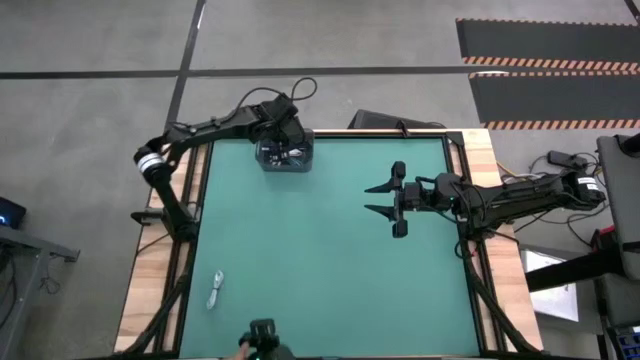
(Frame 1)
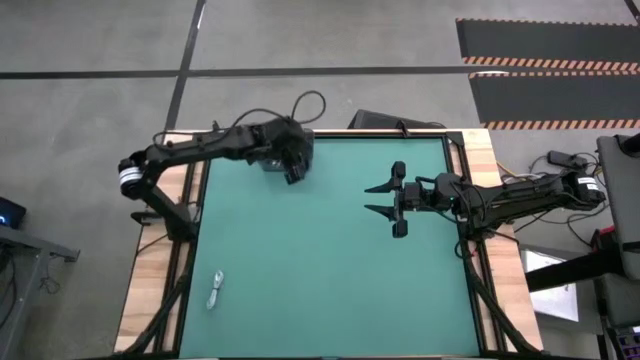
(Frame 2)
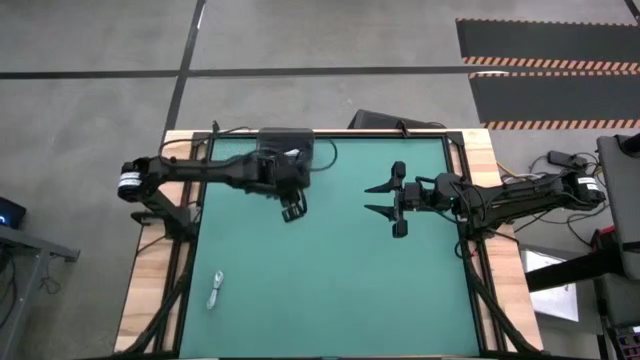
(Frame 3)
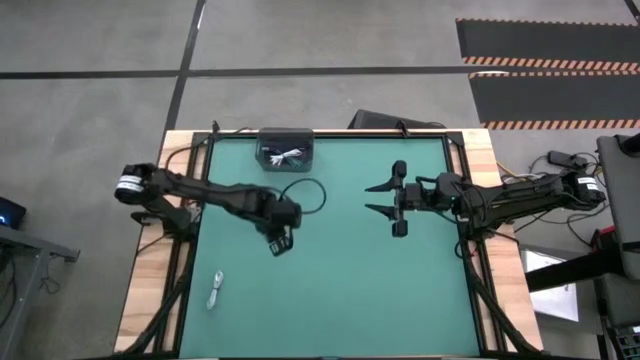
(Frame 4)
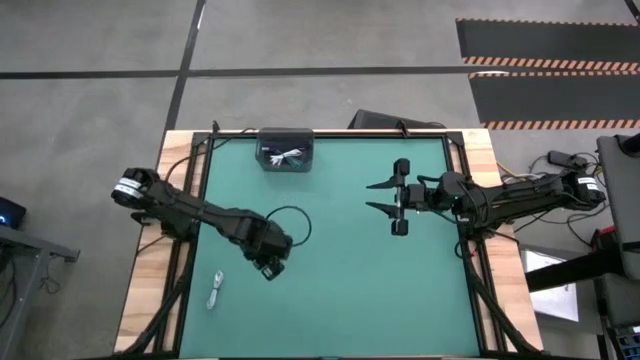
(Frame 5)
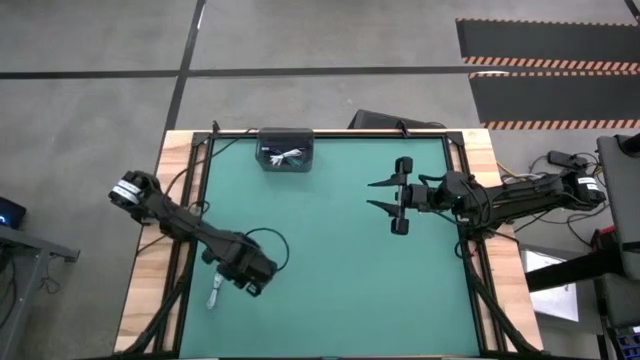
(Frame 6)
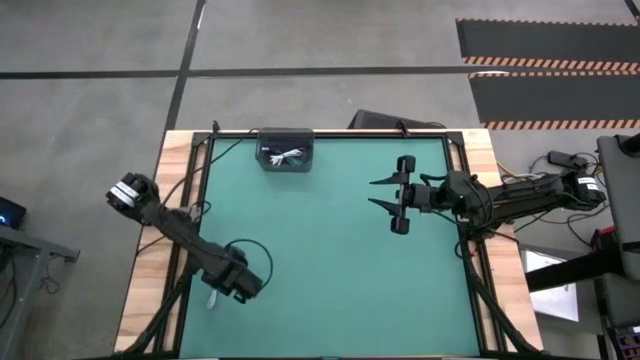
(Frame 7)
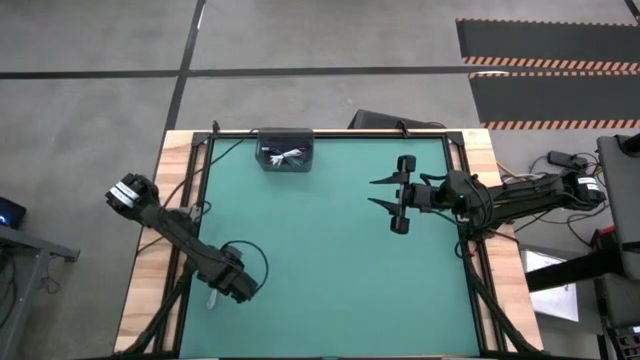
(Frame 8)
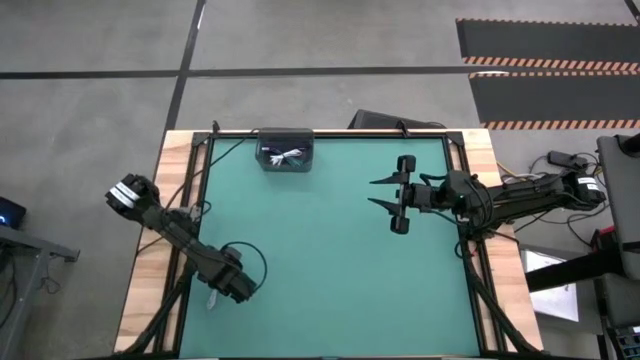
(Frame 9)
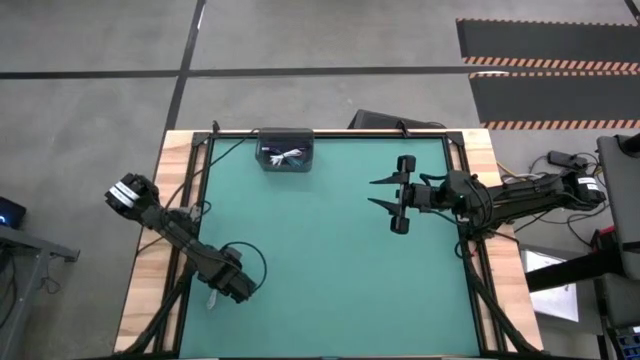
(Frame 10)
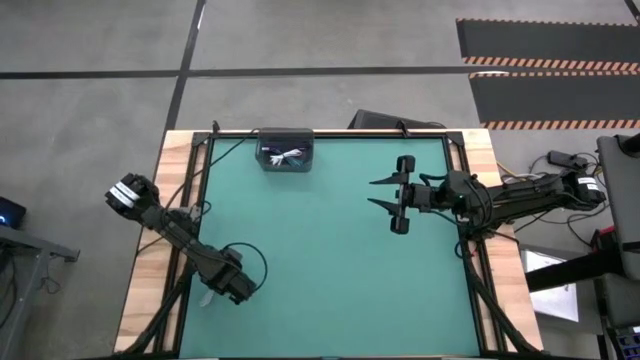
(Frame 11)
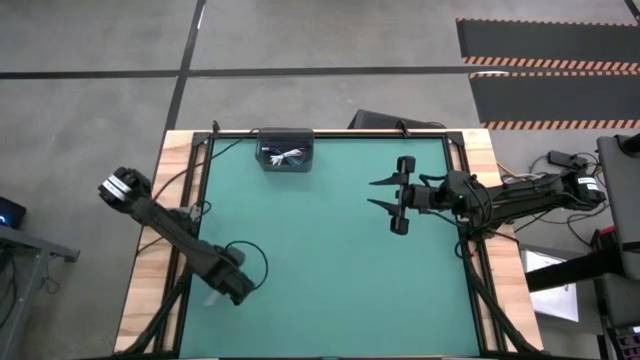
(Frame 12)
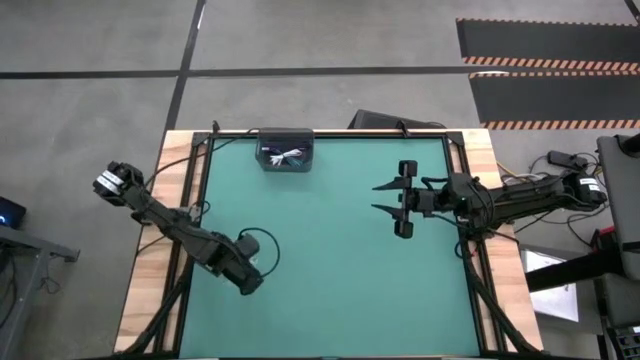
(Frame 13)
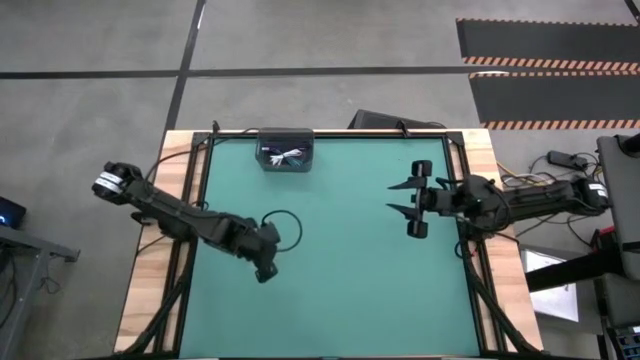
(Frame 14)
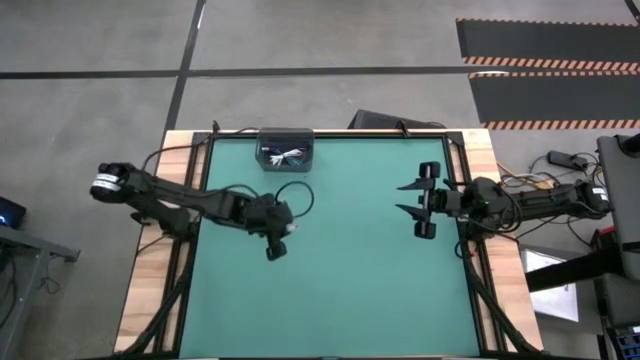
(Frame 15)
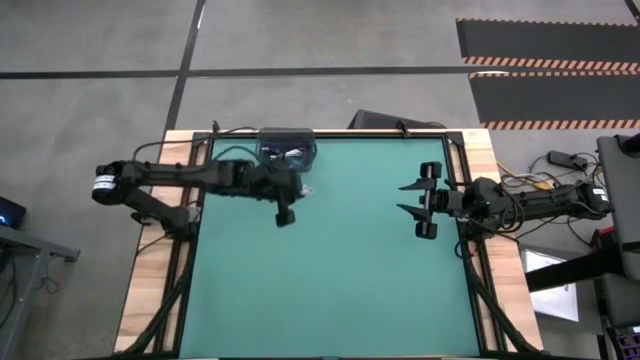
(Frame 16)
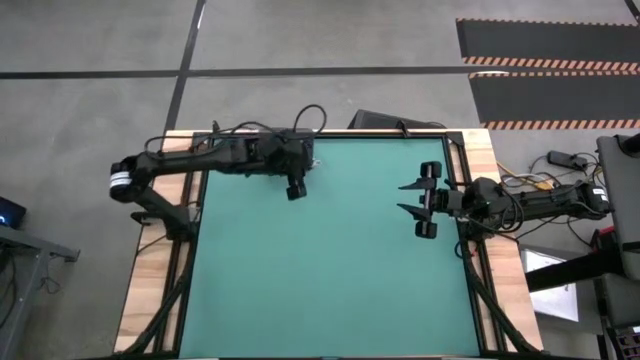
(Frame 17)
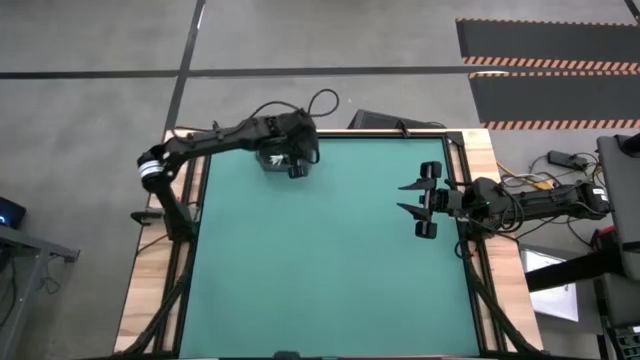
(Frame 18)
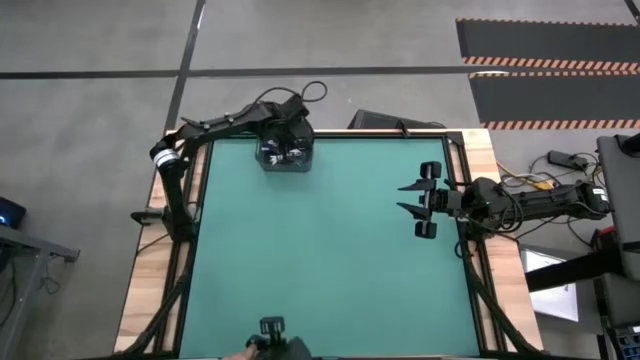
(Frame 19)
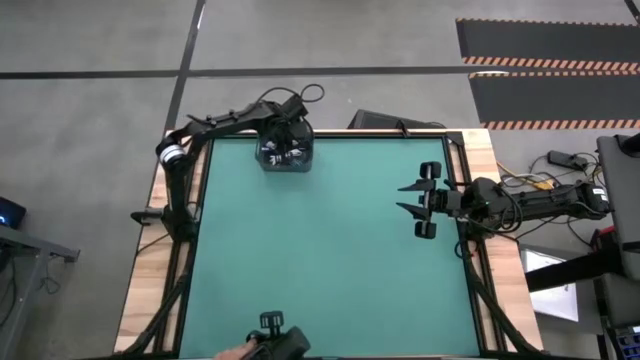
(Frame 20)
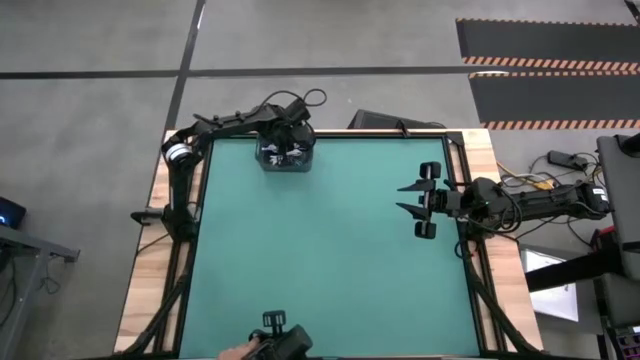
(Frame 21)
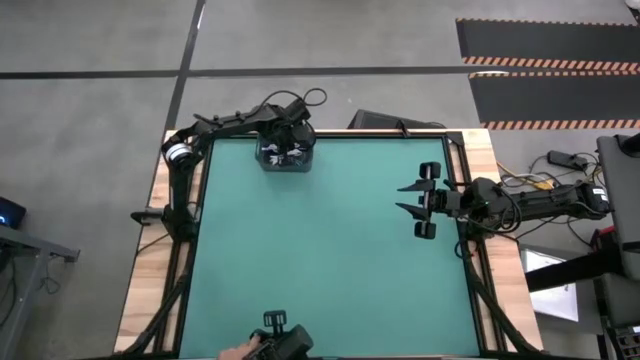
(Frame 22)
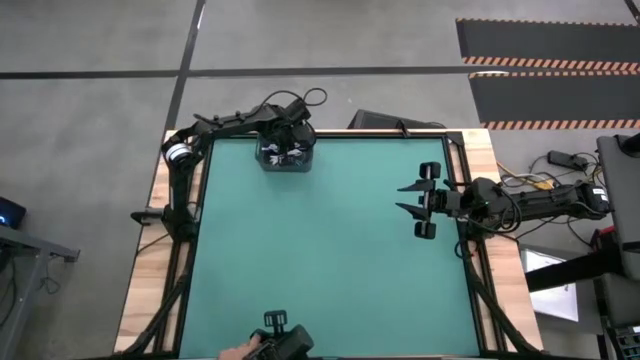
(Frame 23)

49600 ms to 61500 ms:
Task: Pick and place USB-C Cables
Put the light blue charger cable into the bin

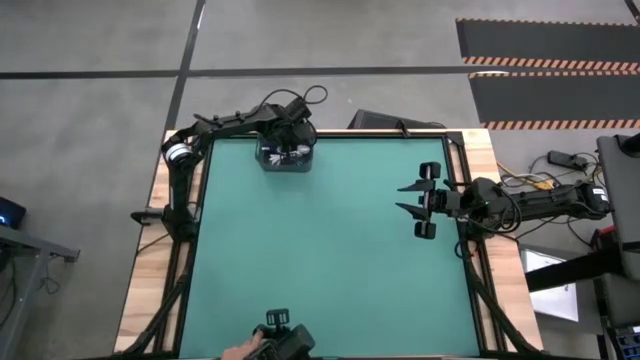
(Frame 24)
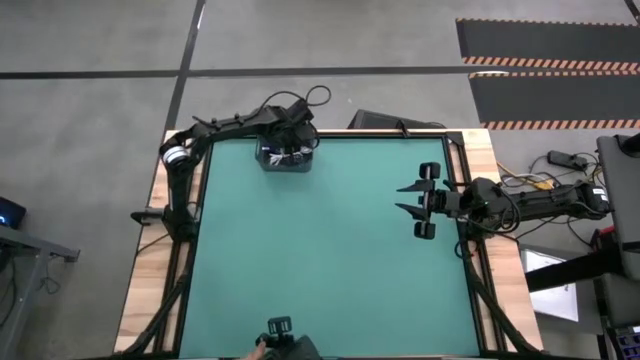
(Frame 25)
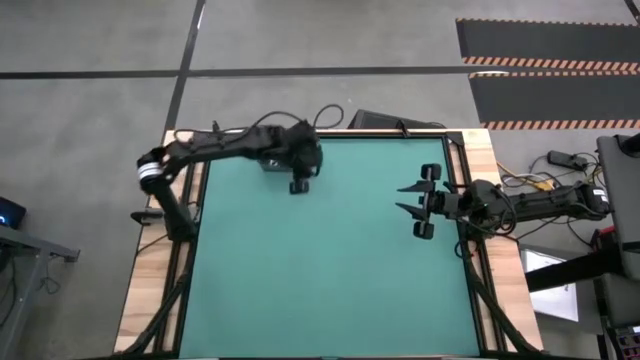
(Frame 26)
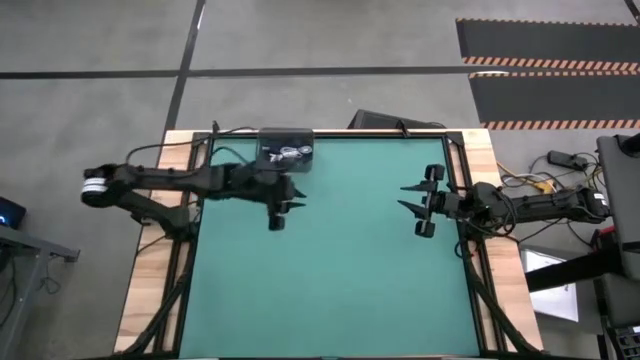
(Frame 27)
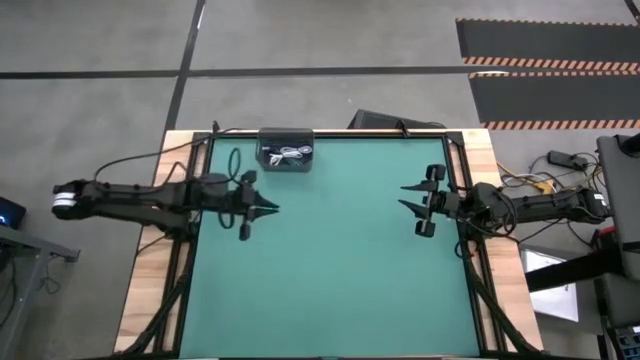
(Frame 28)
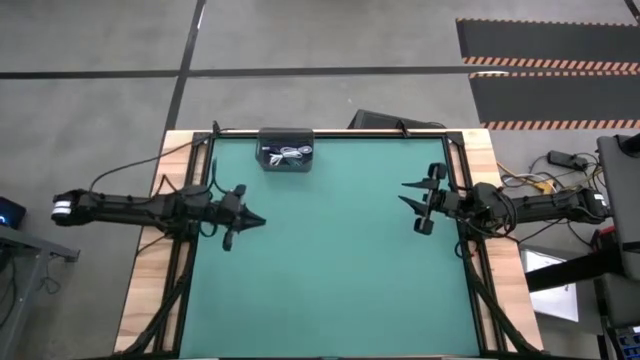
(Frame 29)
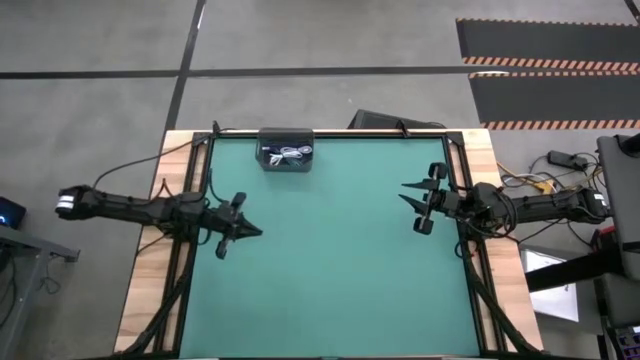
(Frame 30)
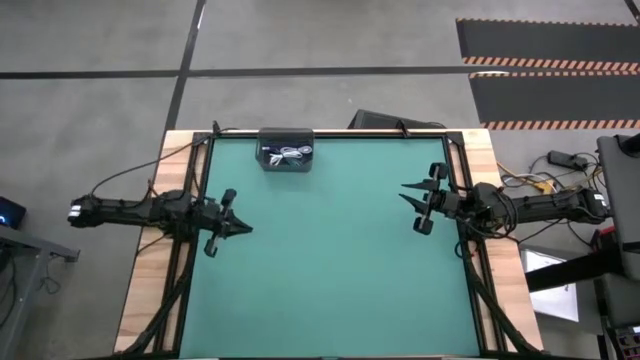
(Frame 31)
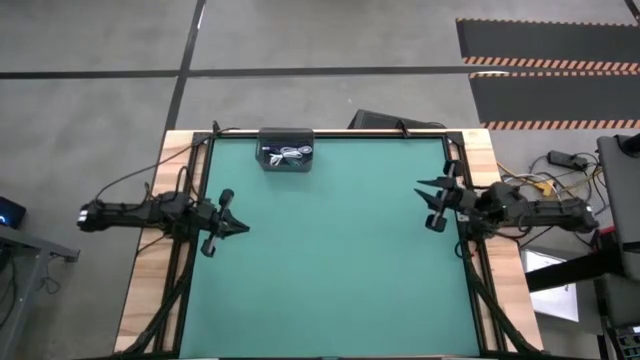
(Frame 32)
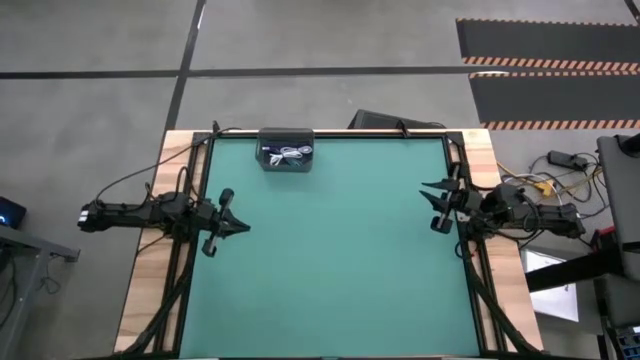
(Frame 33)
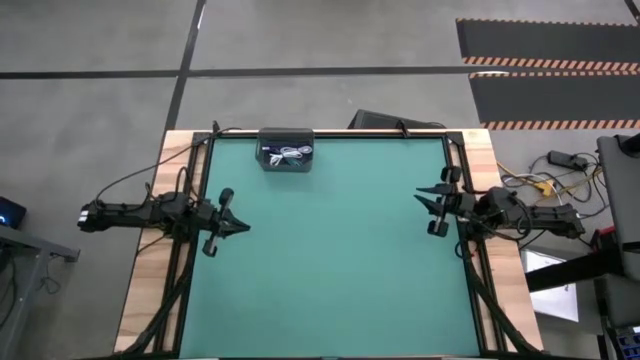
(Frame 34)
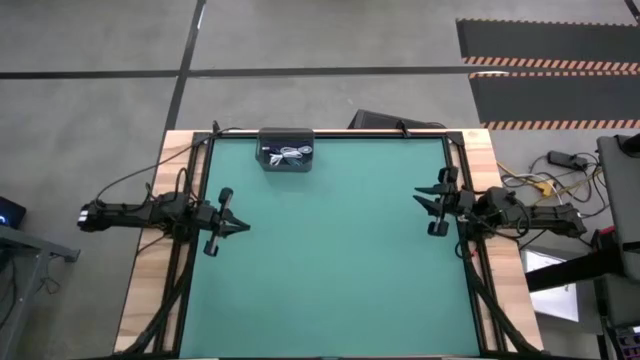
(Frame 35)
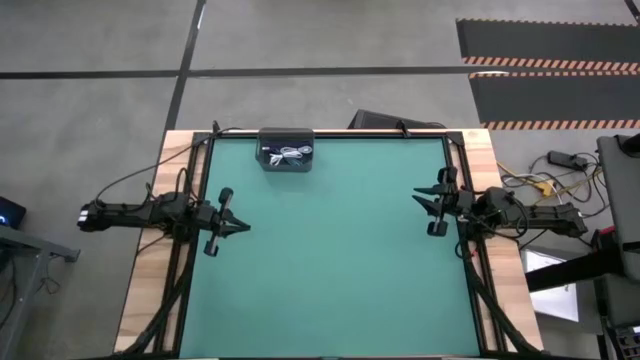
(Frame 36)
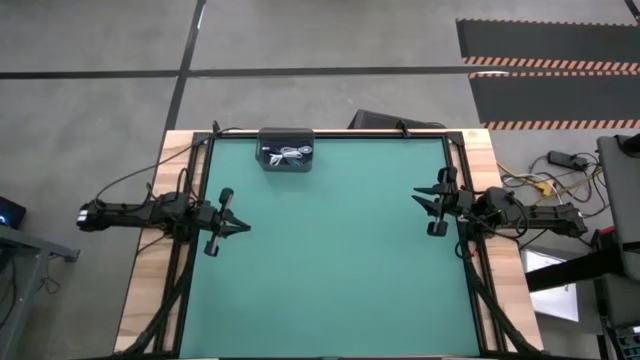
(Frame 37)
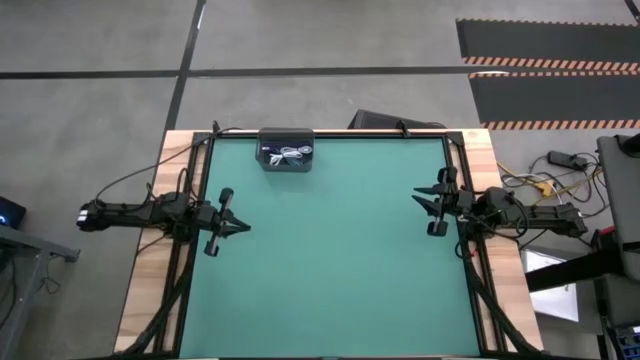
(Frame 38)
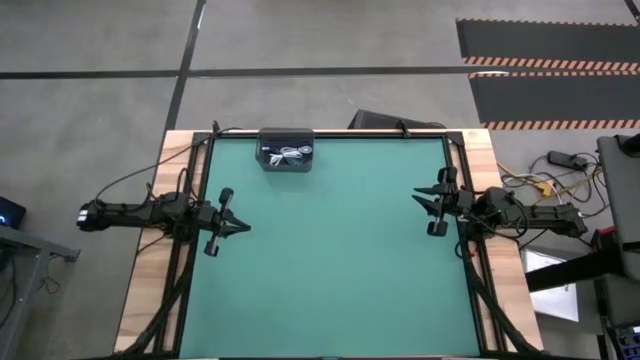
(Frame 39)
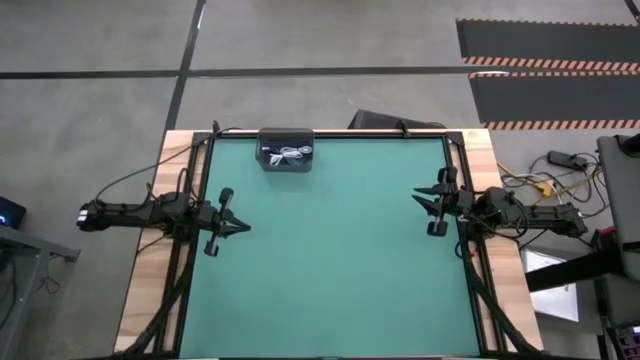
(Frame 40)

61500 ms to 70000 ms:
Return to home Position

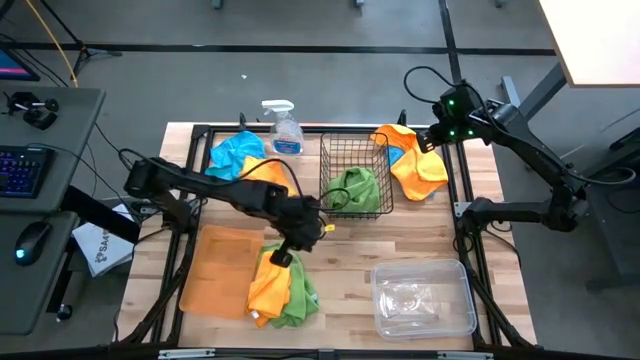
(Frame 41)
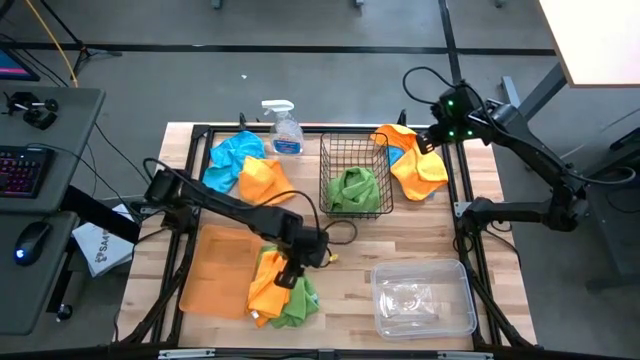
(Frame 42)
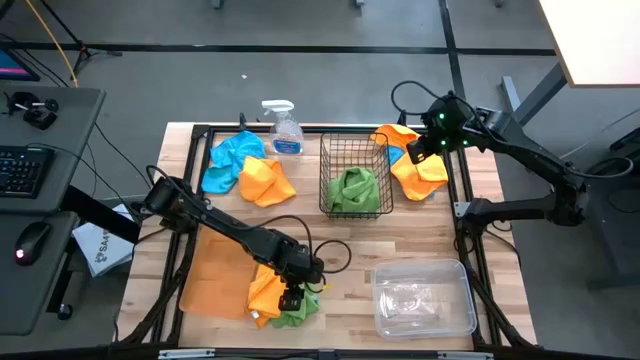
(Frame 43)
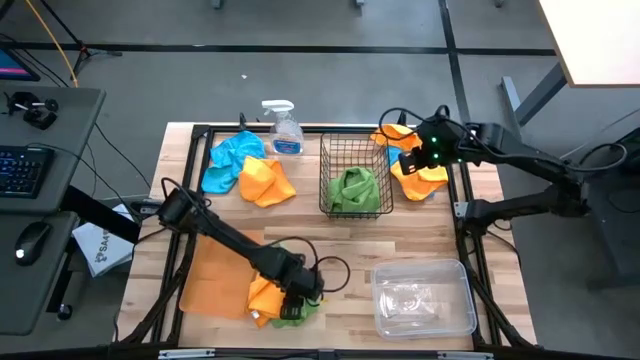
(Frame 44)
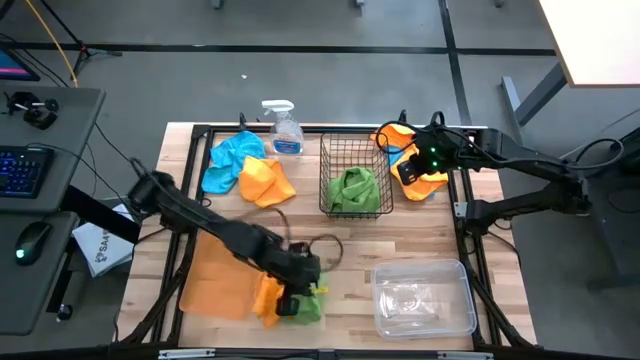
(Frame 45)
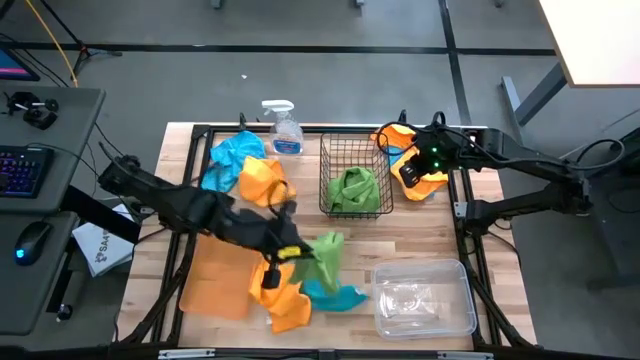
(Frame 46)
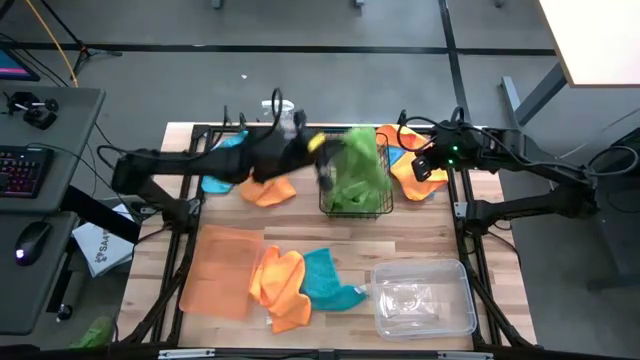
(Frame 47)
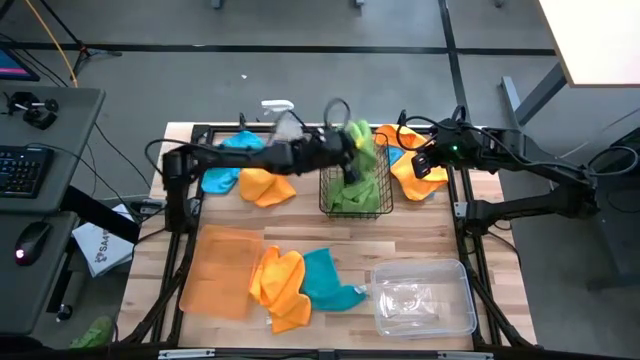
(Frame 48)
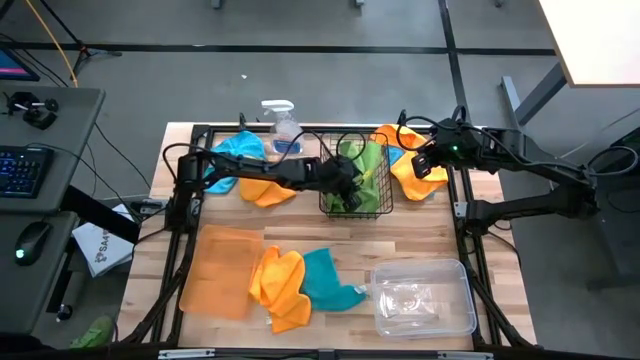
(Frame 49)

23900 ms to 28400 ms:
Task: Sort microfiber towel by color & place in baskets
Put the green microfiber cloth into the mesh basket
